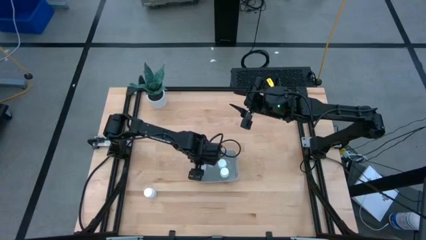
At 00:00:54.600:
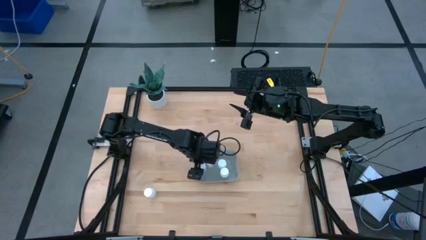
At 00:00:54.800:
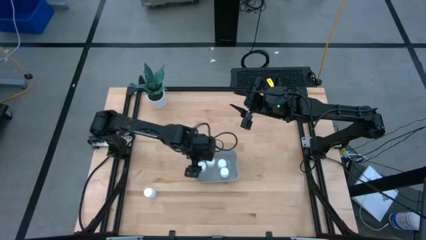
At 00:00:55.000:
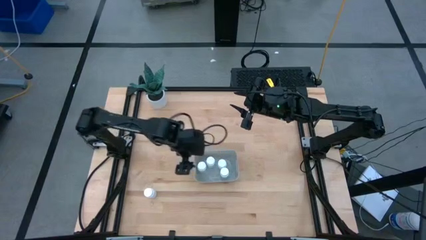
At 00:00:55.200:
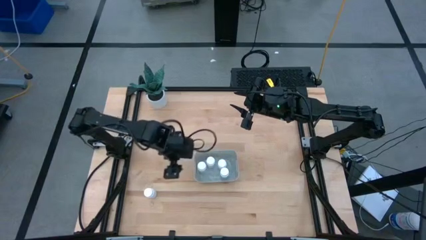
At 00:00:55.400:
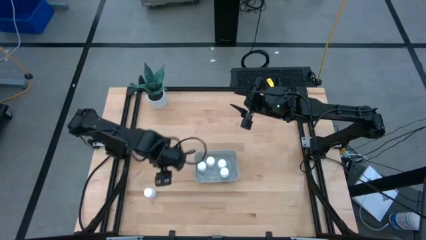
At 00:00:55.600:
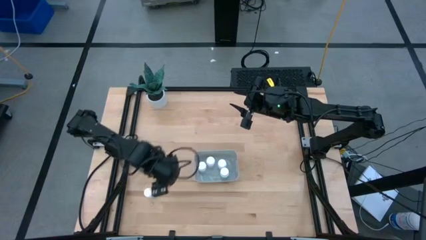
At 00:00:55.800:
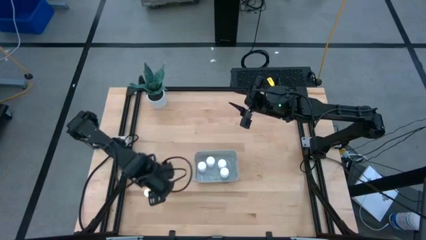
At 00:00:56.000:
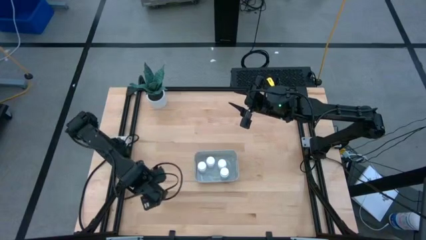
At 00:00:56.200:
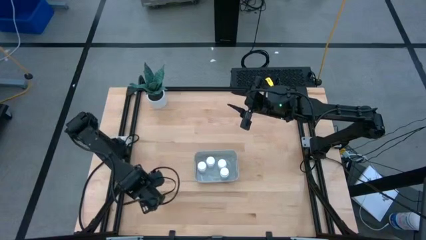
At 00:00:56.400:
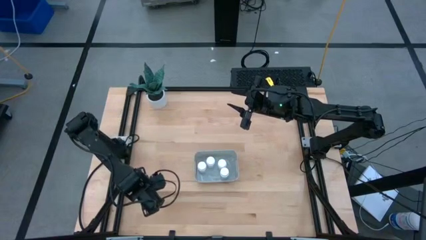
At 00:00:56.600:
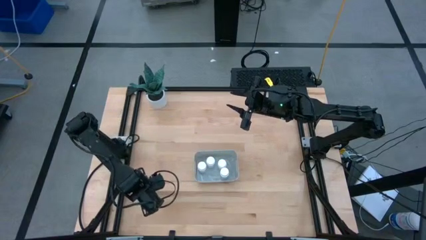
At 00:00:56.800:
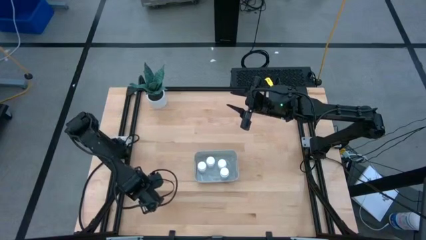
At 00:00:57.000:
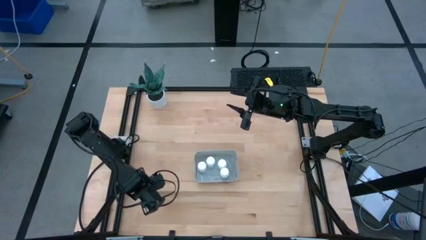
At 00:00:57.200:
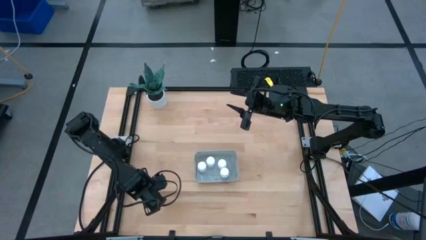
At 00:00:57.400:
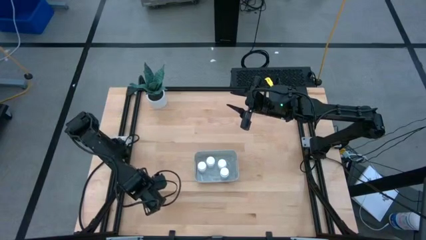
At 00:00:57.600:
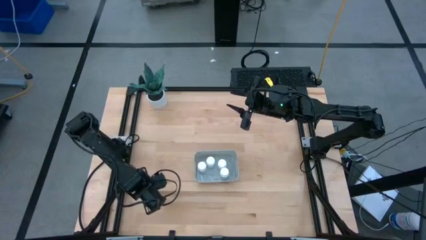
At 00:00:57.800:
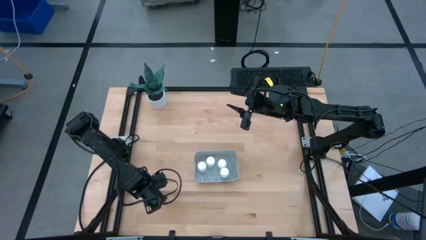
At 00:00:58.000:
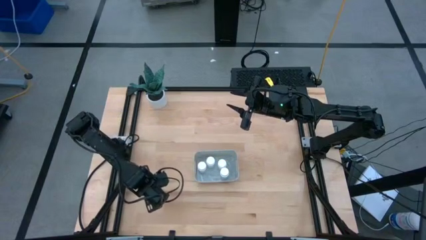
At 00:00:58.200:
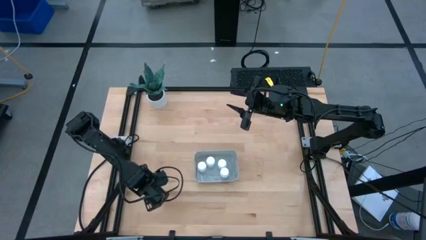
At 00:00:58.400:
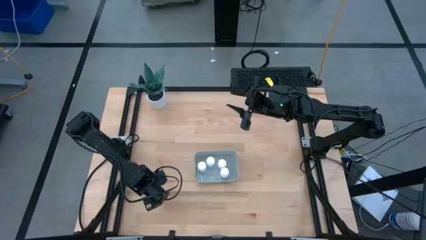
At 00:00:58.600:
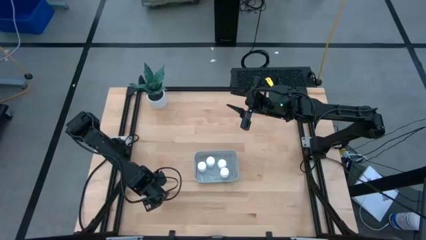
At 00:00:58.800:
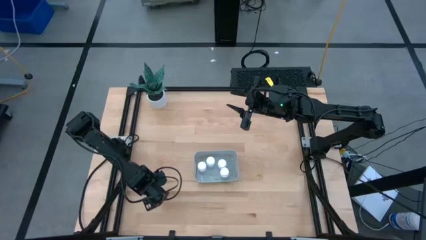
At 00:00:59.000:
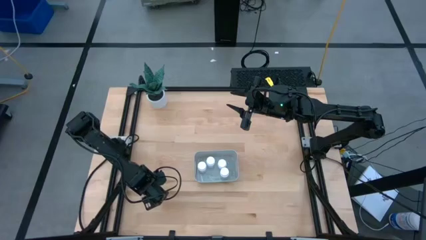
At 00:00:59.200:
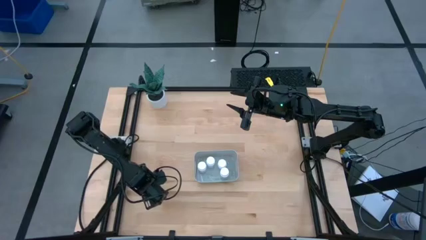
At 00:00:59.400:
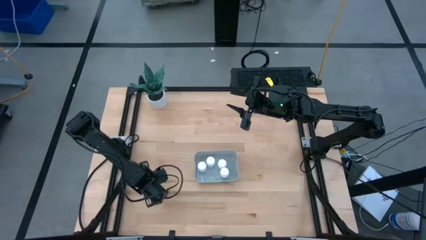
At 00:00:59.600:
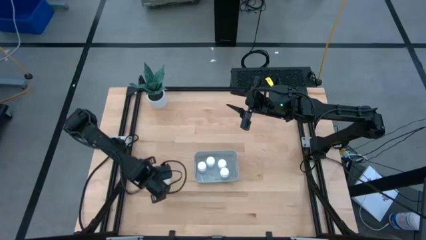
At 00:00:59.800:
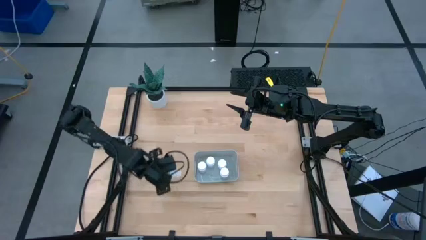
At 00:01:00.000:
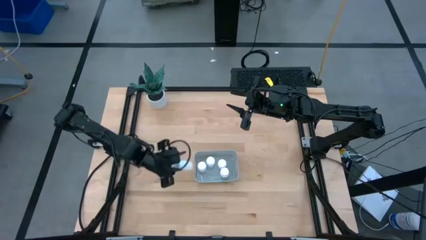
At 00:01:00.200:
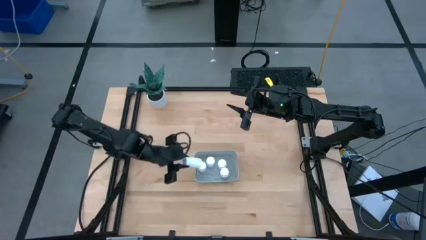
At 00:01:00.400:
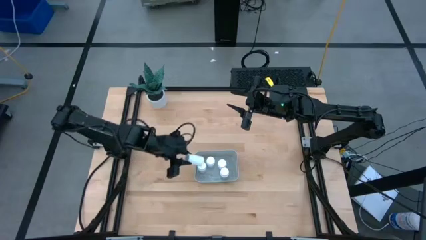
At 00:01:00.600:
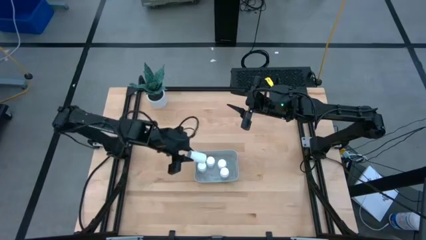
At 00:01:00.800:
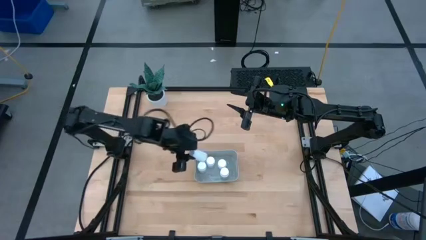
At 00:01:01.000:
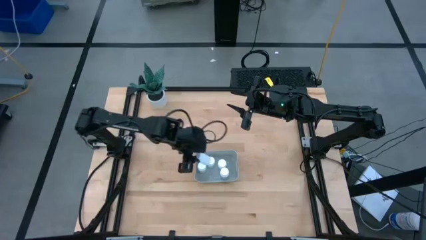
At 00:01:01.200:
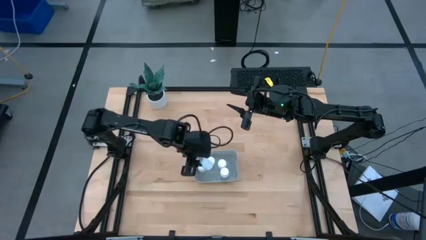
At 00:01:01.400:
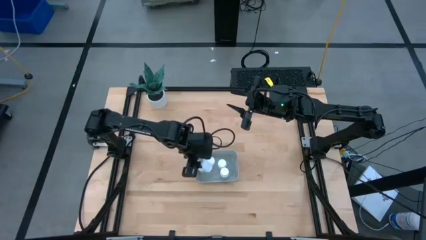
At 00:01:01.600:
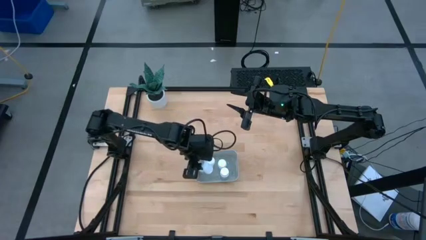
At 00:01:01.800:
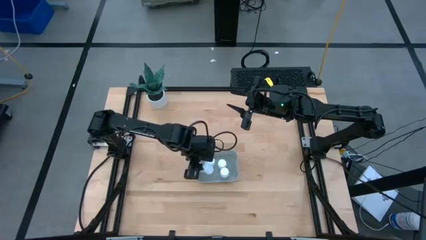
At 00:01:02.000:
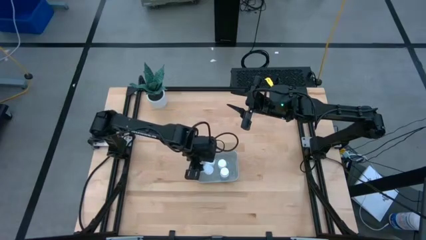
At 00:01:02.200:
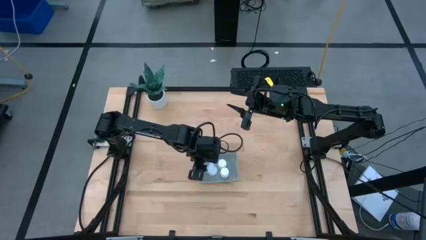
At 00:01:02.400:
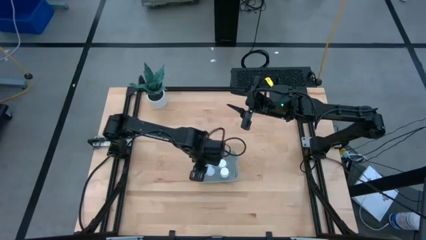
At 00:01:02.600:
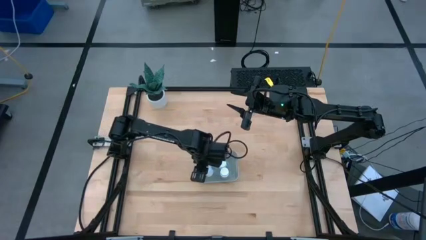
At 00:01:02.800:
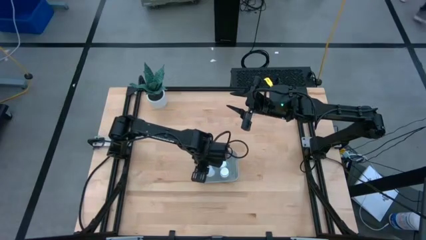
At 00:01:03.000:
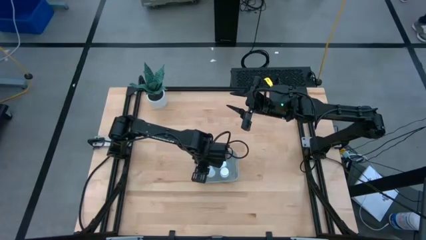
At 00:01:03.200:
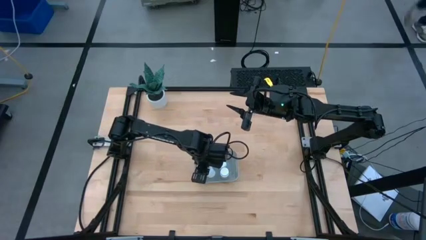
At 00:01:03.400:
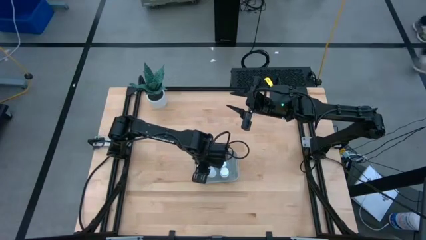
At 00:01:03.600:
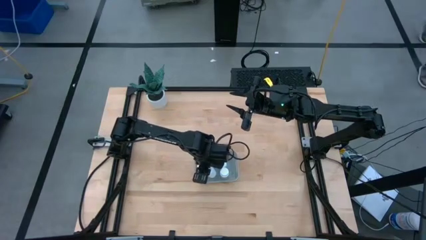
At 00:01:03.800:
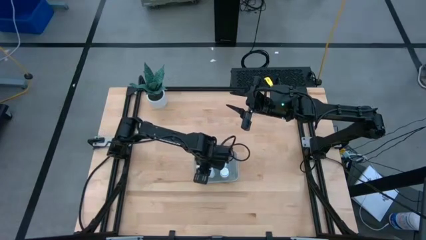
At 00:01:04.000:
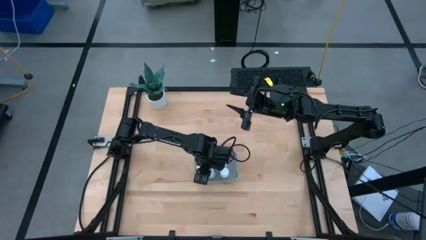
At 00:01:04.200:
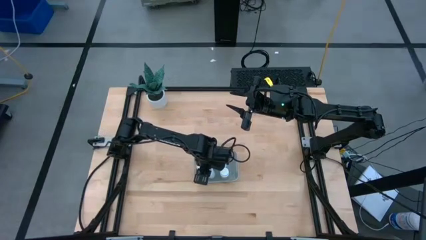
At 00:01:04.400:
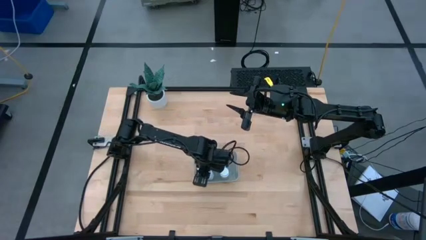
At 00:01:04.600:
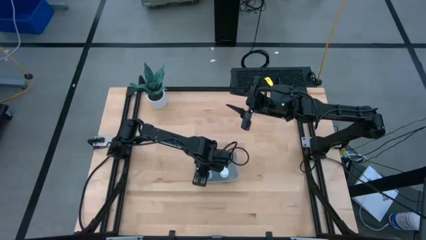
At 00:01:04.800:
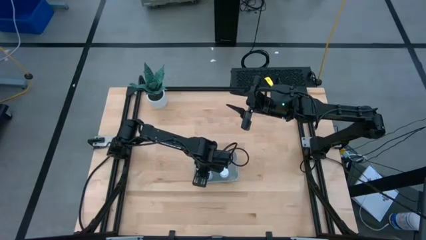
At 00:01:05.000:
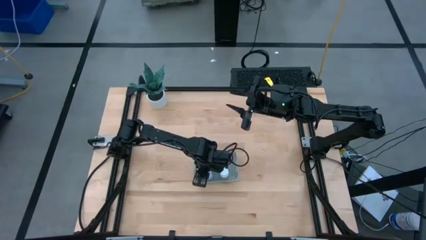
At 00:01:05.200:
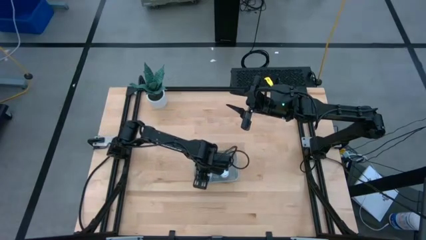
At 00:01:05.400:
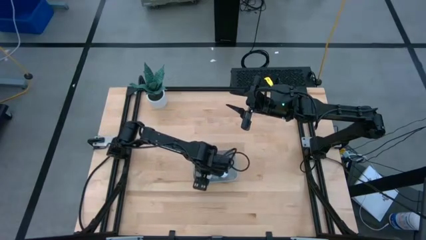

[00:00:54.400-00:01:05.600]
Task: Pick and place pill bottles into a basket
Put the white pill bottle into the gray bin

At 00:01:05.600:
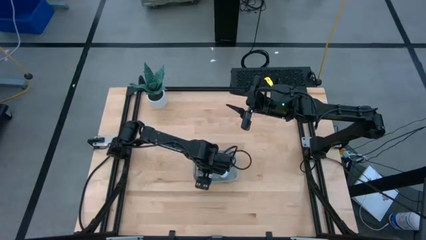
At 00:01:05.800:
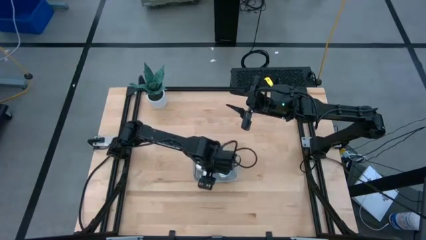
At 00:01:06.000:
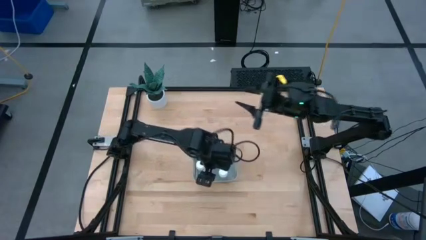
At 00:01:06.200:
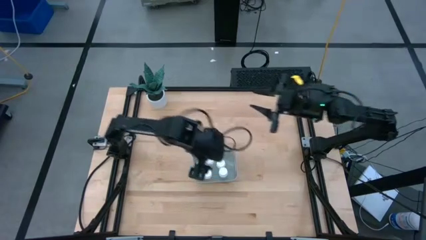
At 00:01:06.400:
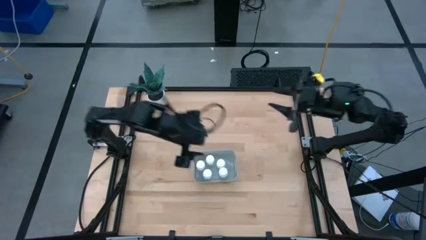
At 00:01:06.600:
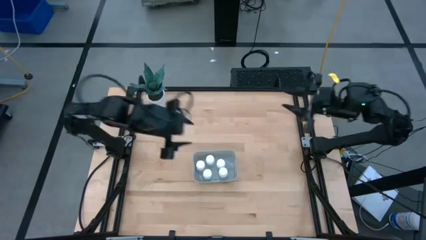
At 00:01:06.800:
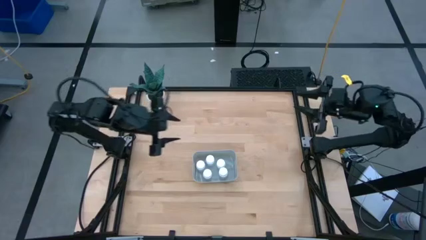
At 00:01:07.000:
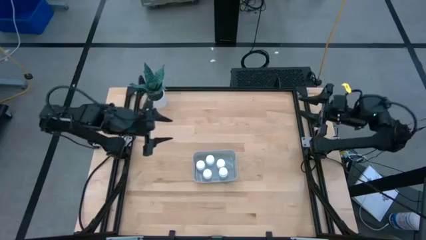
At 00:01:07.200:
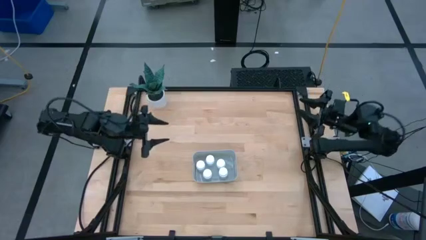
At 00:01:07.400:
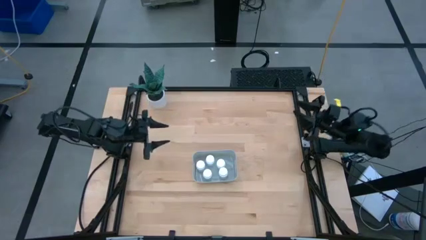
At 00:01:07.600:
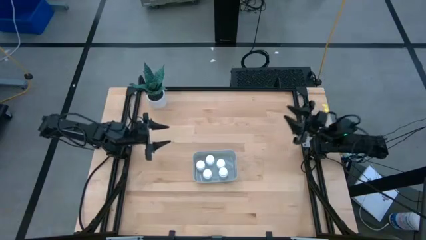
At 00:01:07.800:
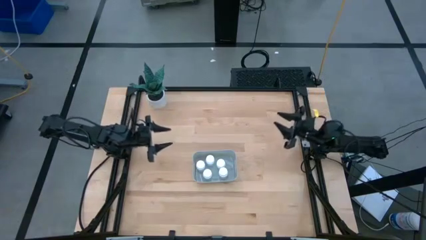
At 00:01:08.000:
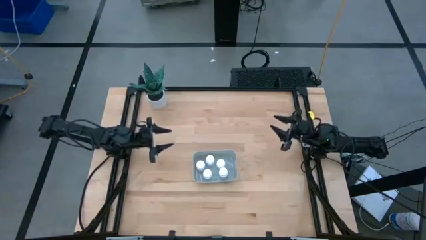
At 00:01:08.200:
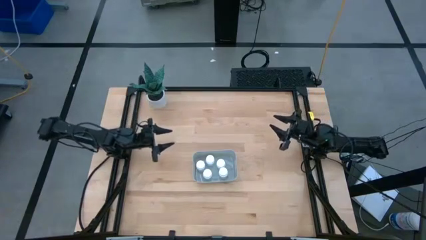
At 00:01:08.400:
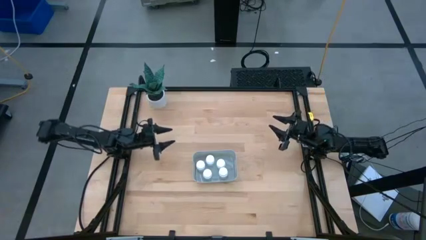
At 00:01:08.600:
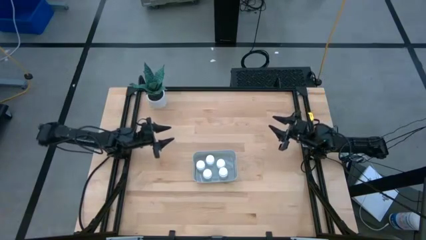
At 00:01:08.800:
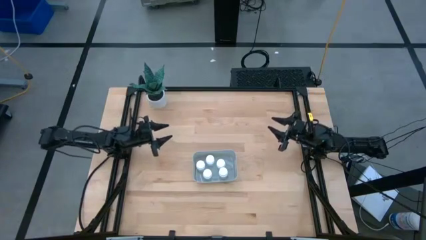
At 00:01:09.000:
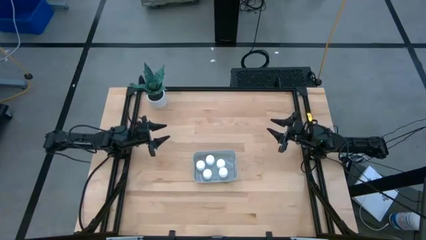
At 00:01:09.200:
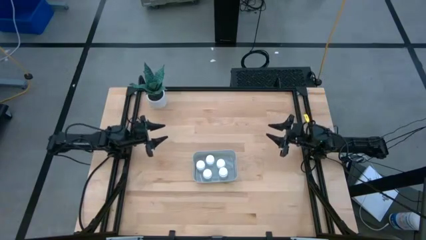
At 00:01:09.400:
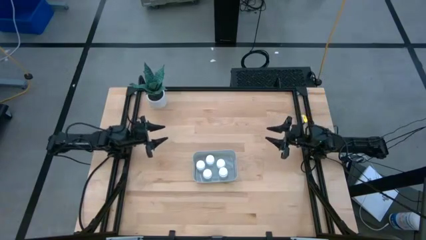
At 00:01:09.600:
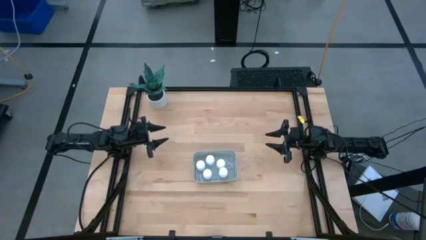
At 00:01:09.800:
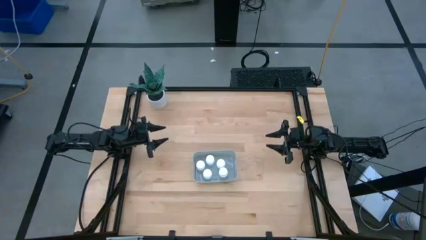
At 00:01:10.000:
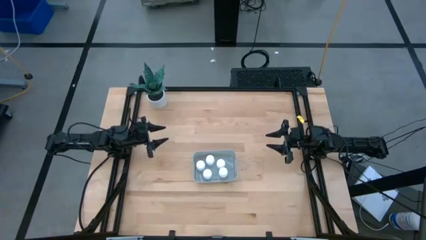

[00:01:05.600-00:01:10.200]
Return to Home Position

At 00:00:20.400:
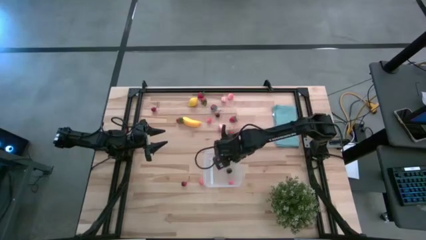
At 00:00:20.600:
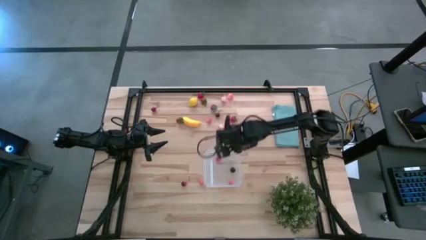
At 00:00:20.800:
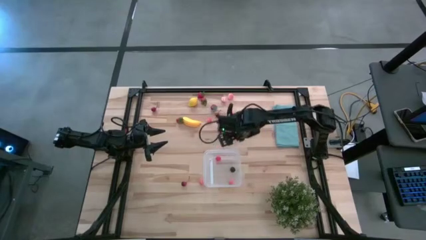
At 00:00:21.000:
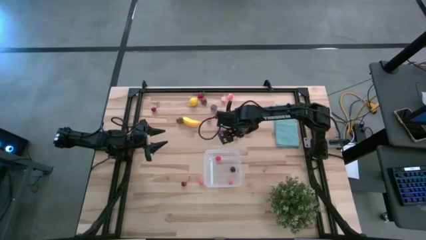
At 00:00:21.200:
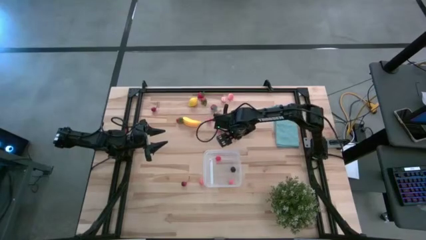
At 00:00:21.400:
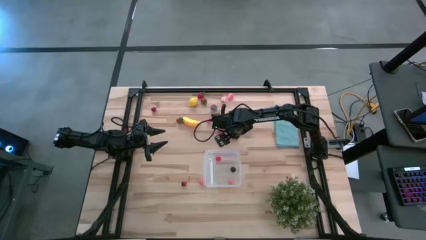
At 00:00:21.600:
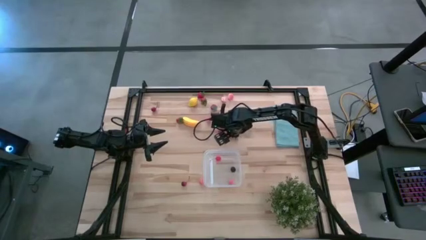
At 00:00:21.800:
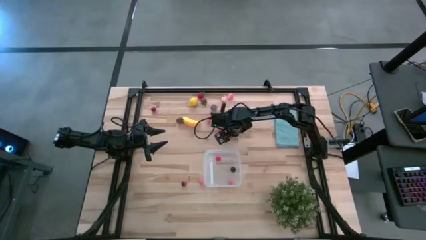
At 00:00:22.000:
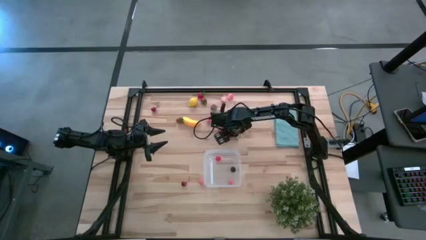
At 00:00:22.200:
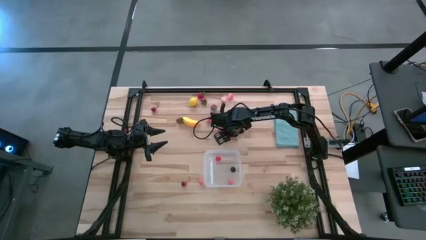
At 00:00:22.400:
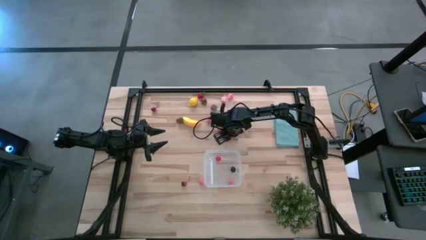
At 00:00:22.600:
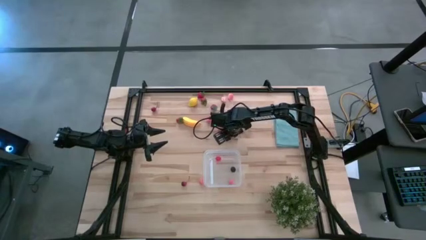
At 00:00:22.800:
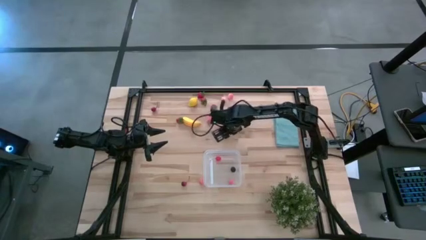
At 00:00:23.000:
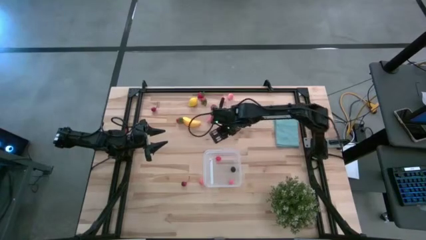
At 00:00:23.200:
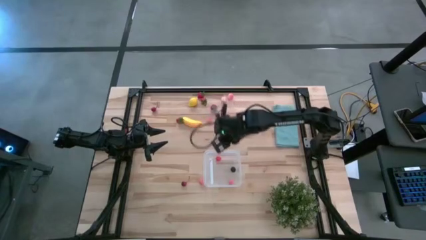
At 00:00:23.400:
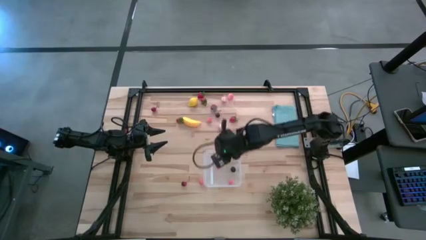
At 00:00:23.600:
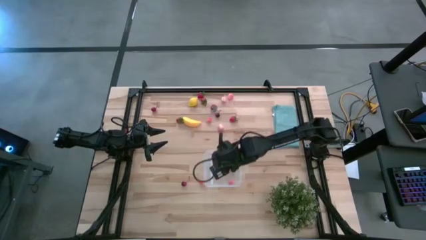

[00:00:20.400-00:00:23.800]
Task: Pick and placing Produce into tupperware
Put the red strawberry into the transparent bin
